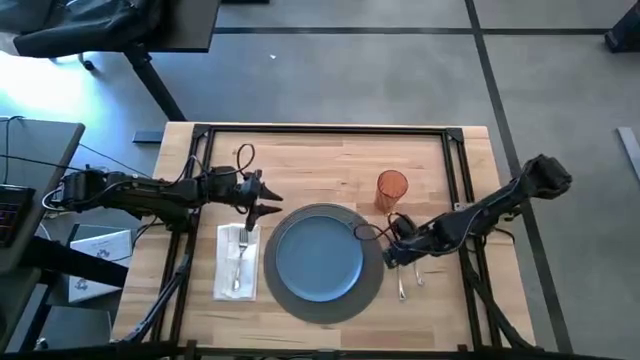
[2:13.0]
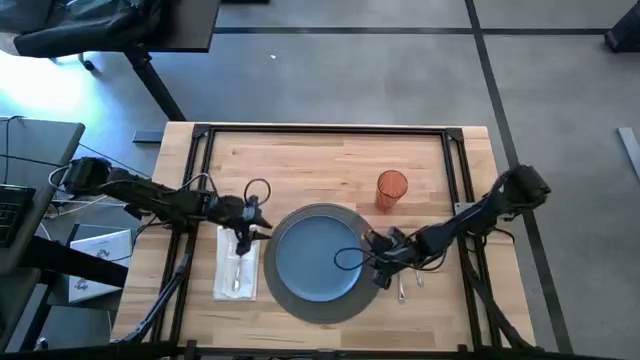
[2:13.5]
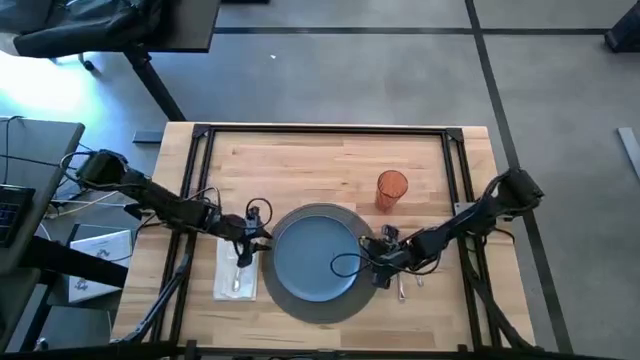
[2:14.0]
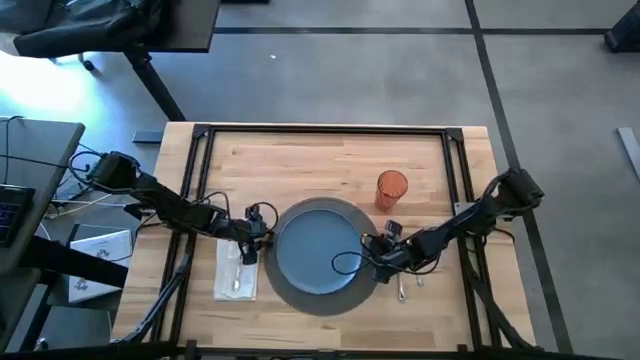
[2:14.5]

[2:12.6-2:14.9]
Task: Set table place
Adjust the gray table mat

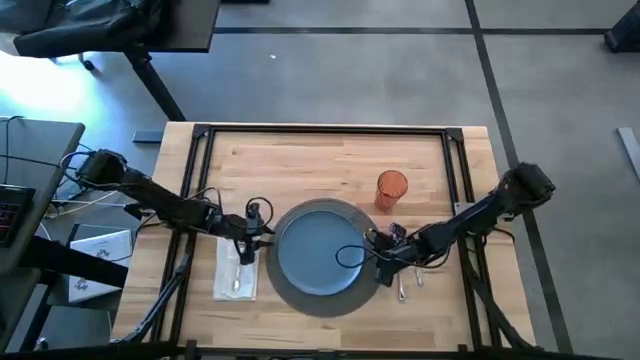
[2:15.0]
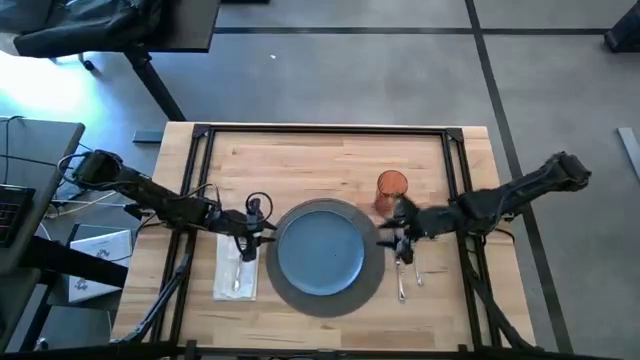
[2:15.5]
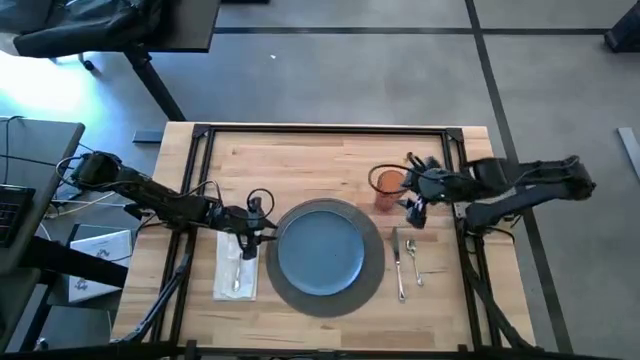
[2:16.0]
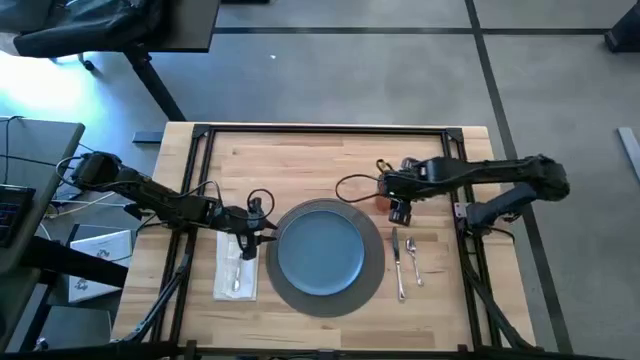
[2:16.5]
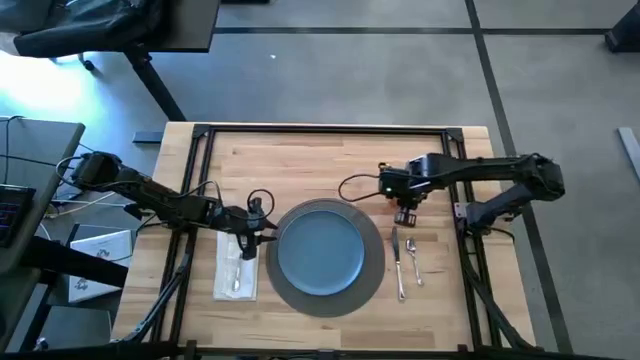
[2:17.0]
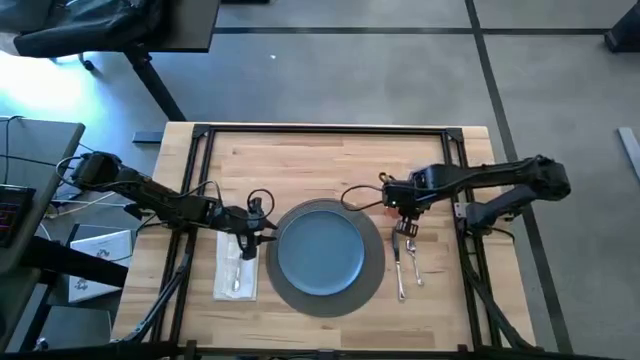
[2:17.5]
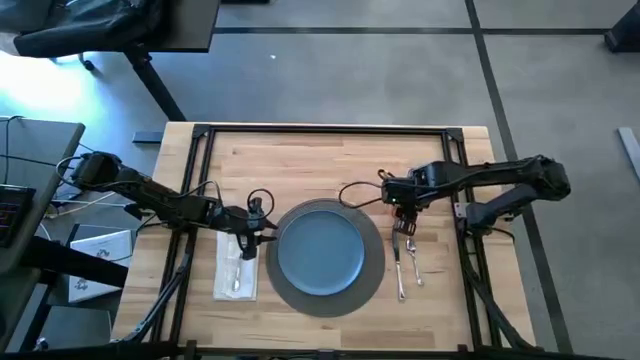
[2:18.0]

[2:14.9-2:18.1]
Adjust the orange cup

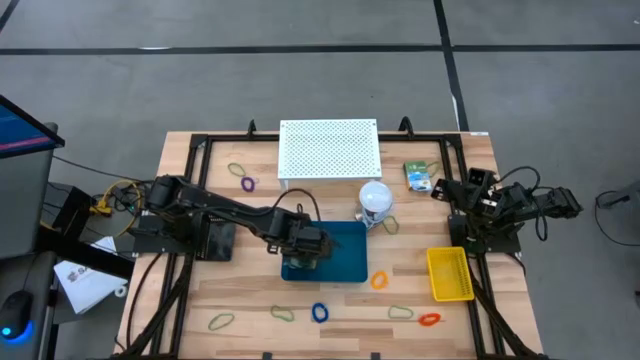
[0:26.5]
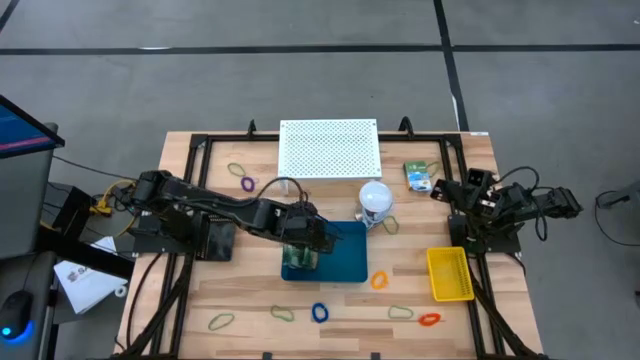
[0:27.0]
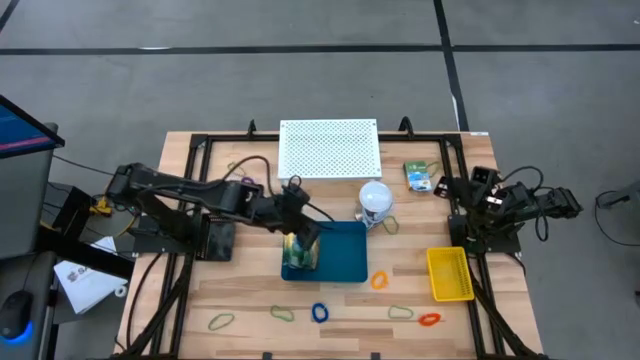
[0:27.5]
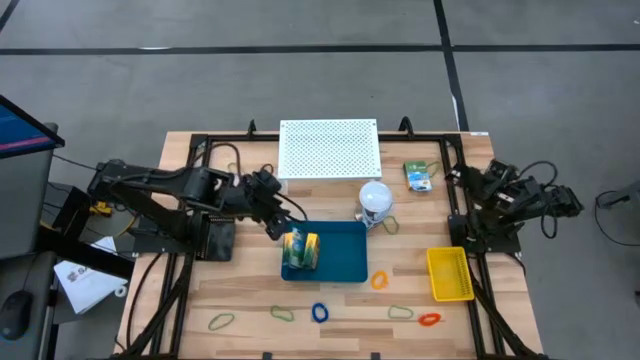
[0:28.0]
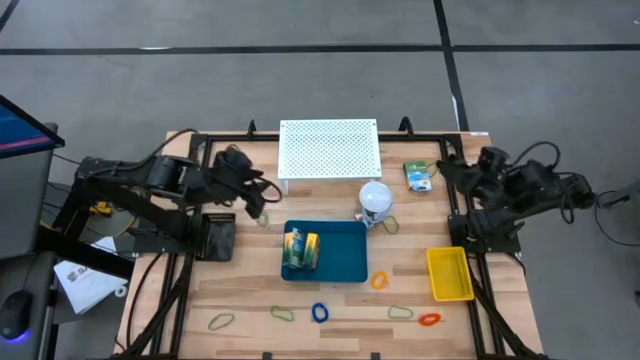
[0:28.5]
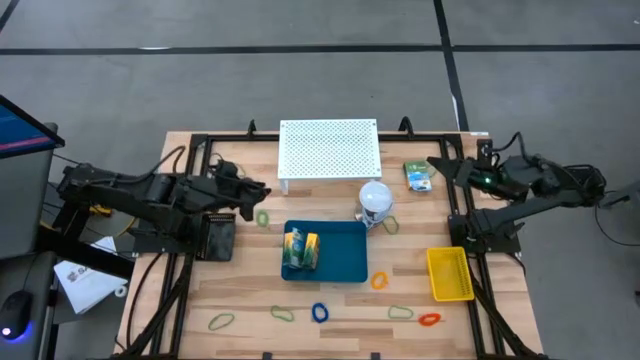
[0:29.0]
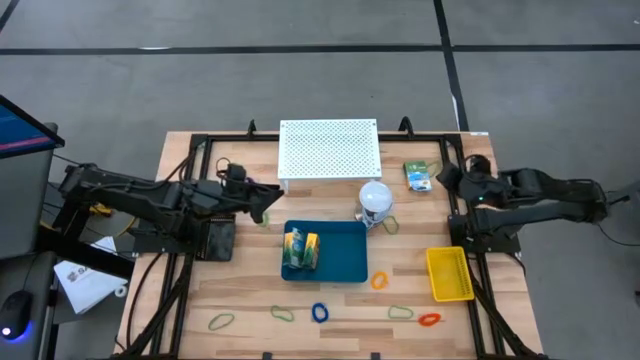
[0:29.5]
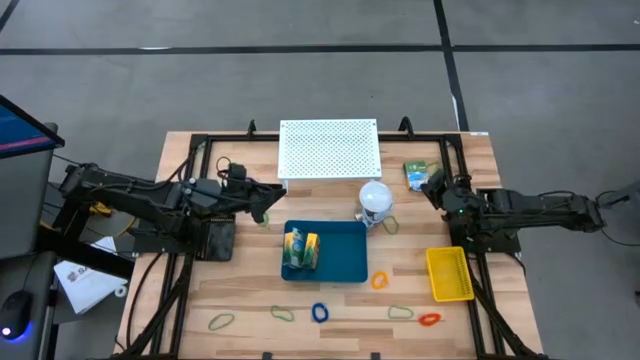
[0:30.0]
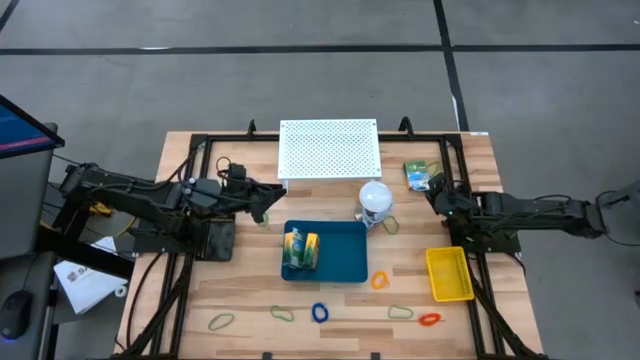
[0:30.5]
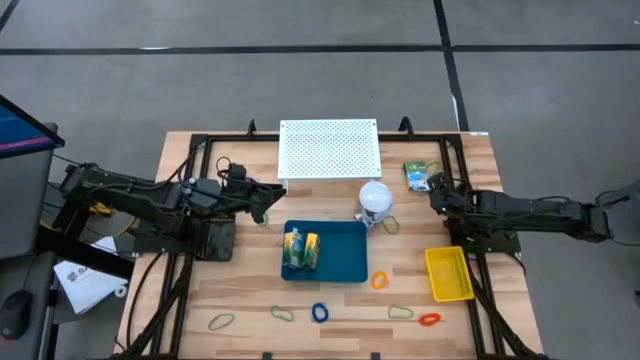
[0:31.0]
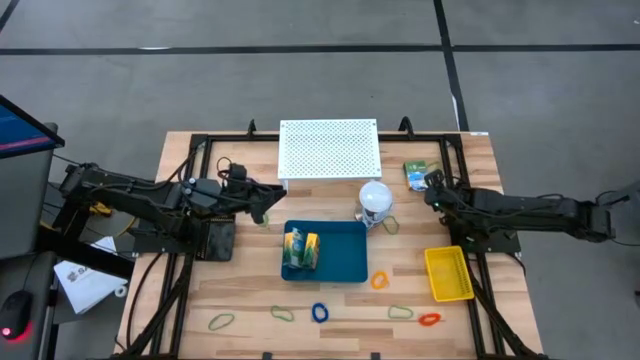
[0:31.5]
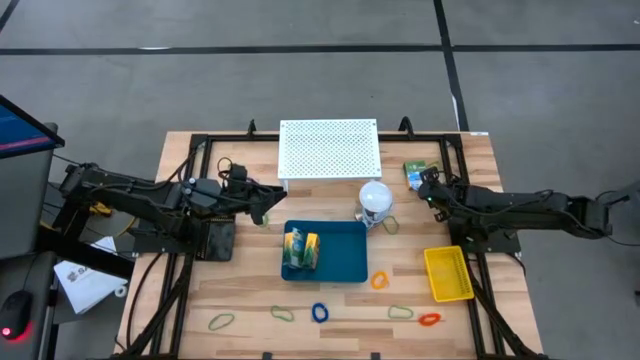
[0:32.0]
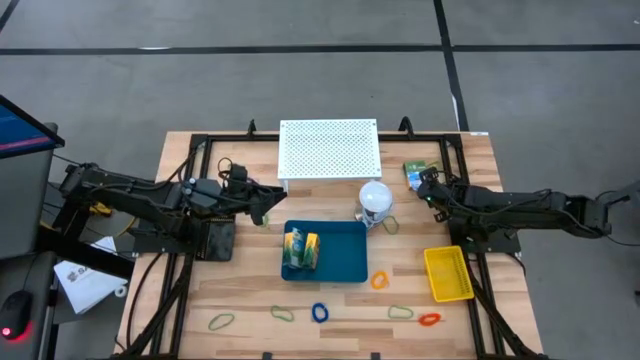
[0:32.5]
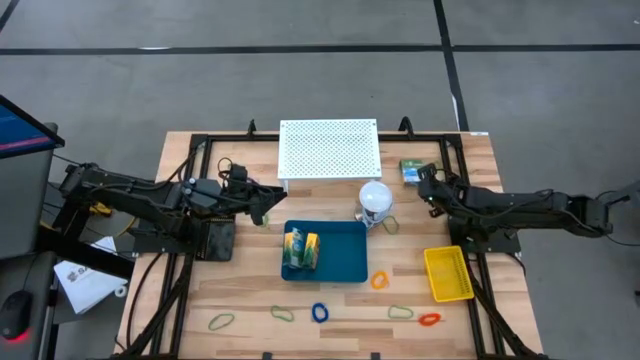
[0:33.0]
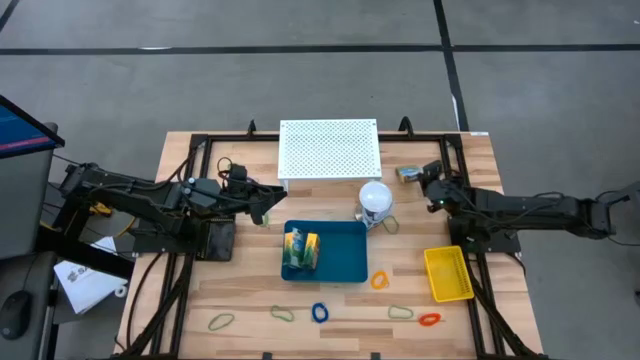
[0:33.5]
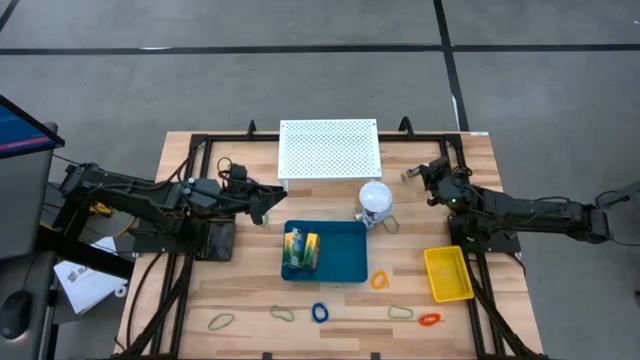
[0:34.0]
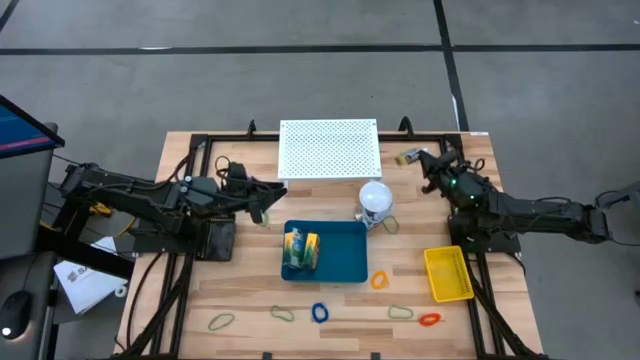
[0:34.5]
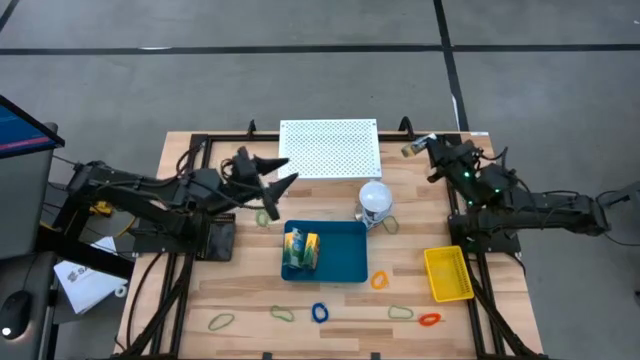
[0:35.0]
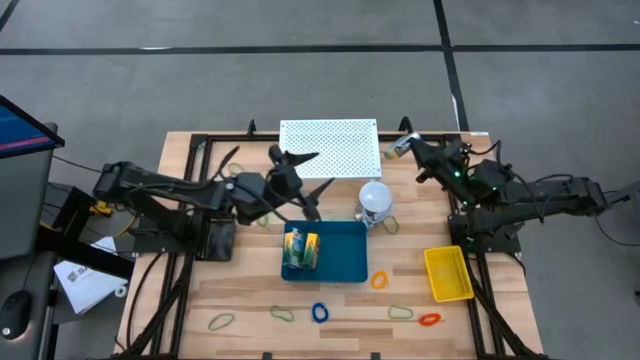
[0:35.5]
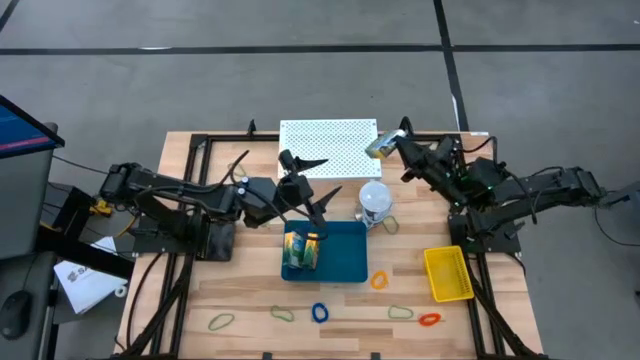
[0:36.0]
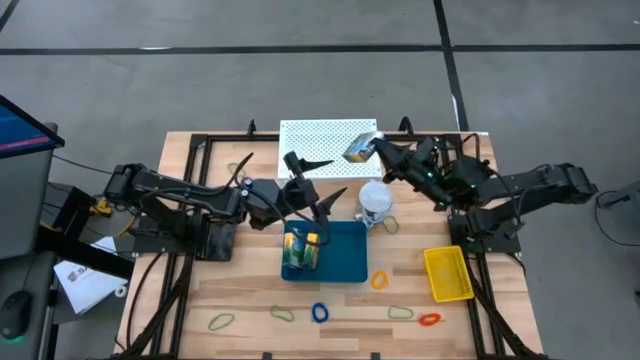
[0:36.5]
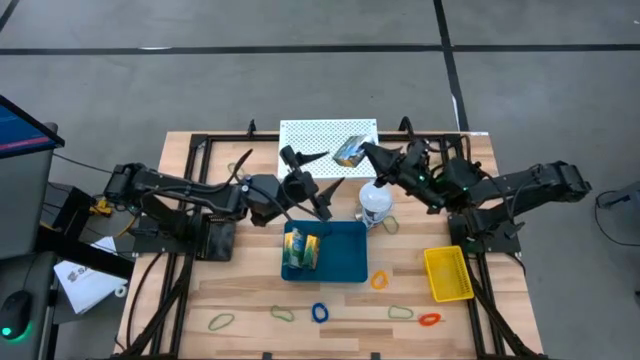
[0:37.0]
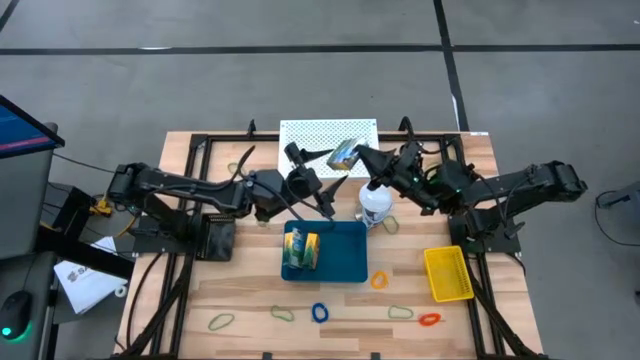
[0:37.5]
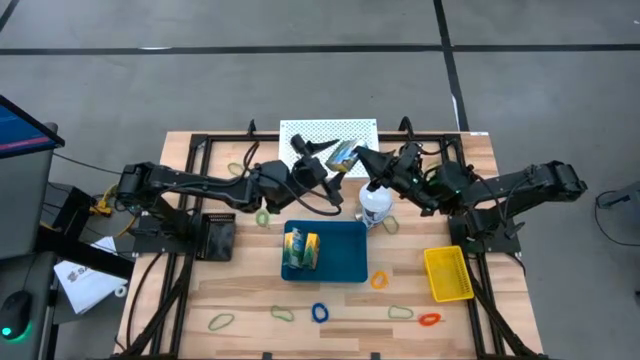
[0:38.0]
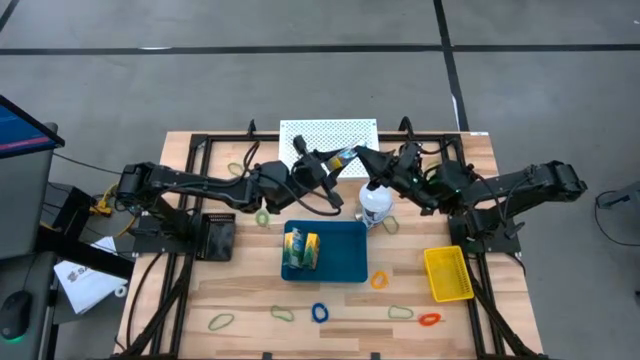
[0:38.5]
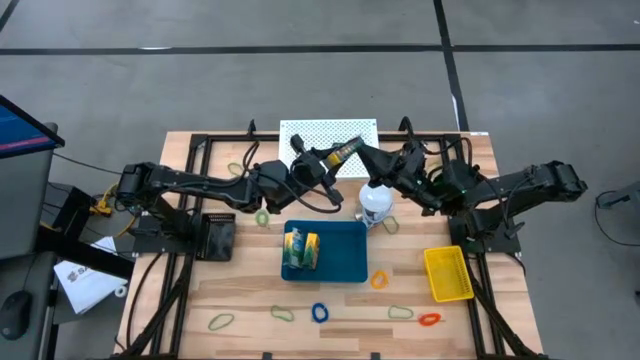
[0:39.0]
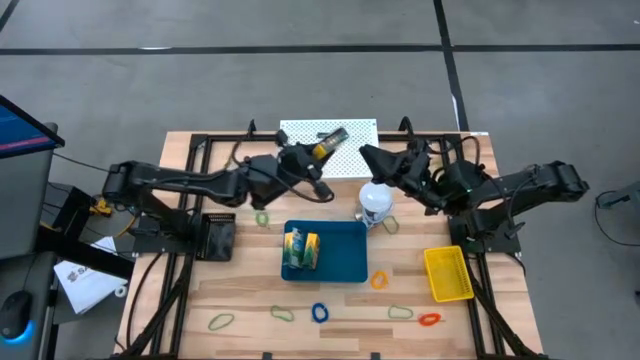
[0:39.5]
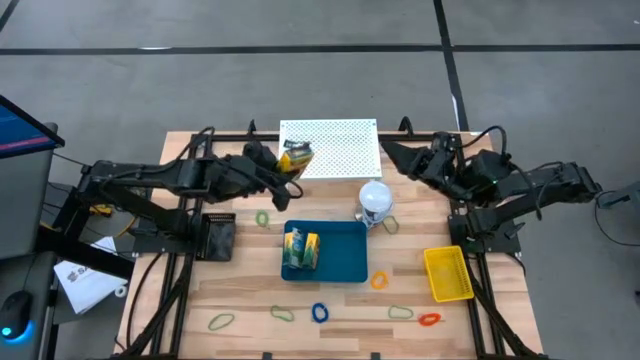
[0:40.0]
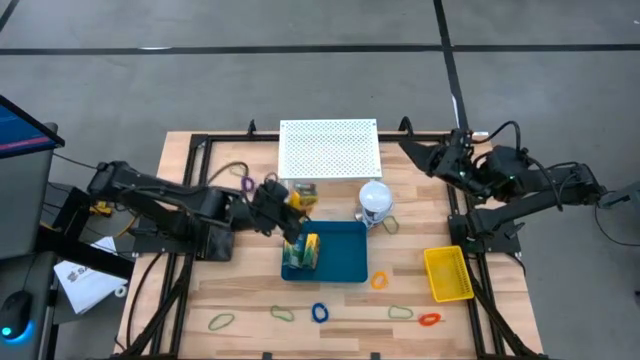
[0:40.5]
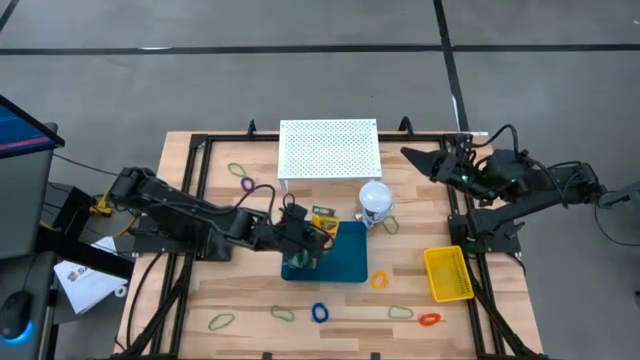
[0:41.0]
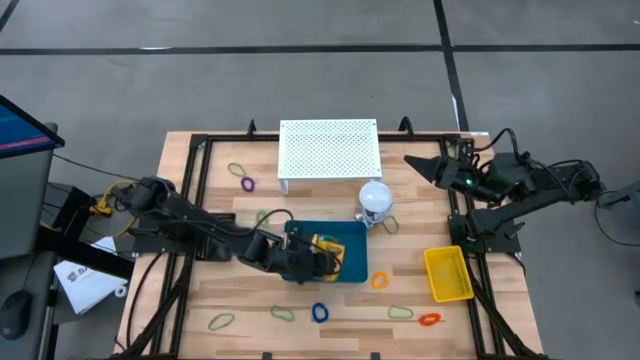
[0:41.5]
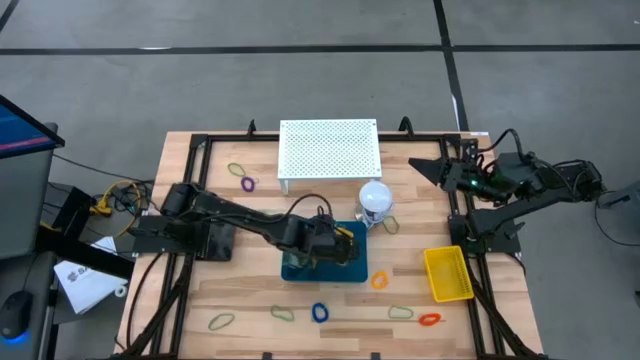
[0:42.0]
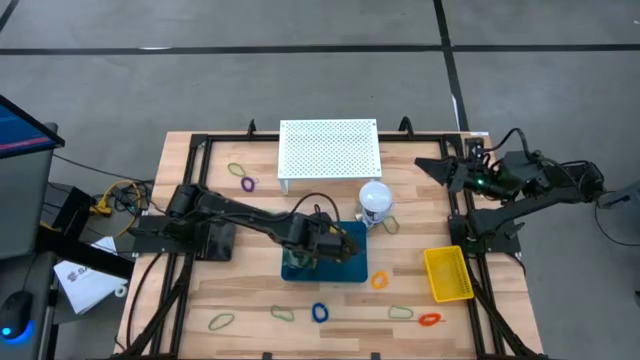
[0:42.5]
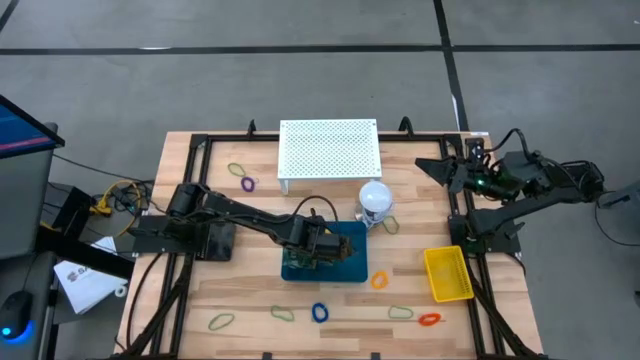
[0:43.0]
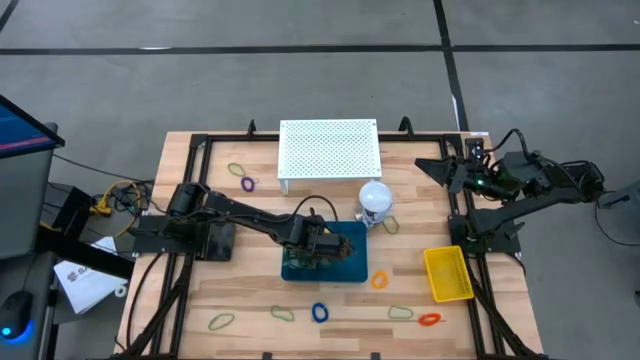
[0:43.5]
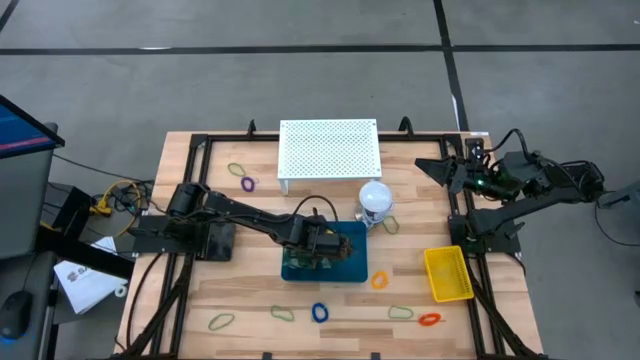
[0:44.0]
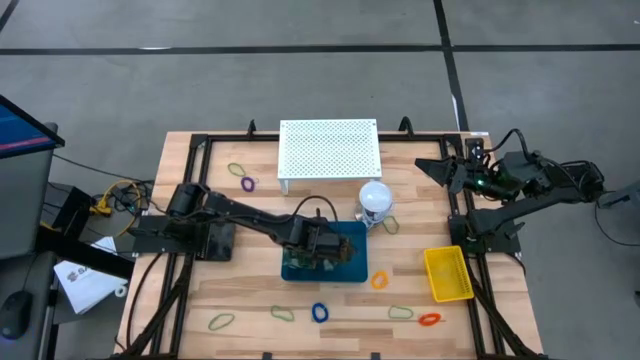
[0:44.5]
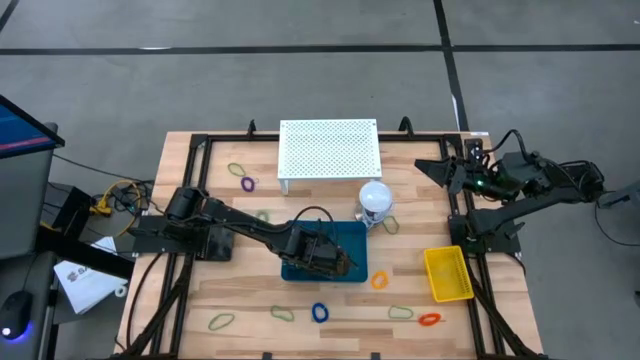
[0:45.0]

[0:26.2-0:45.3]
Task: Pick & Place Office Desk Supplies
Put the crayon box into the blue bin
